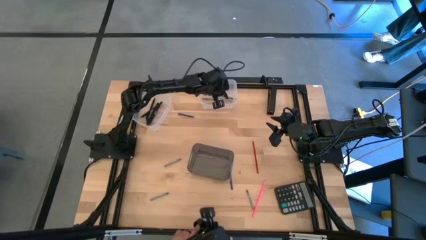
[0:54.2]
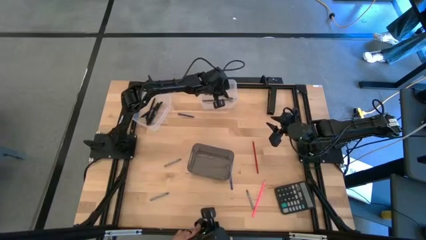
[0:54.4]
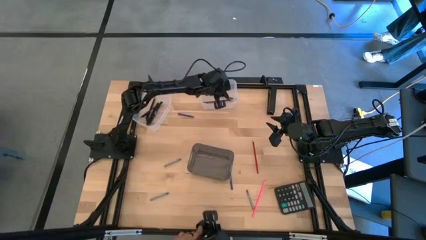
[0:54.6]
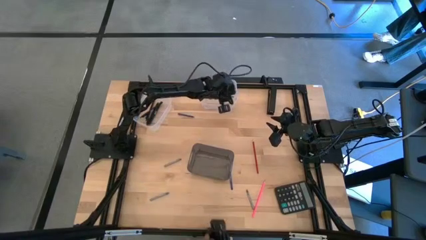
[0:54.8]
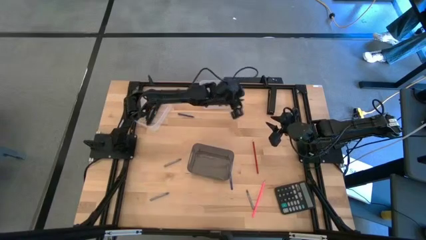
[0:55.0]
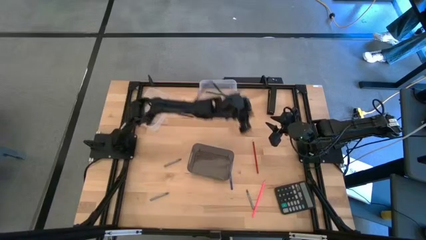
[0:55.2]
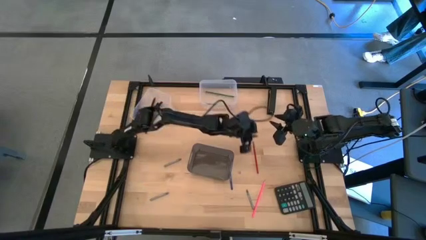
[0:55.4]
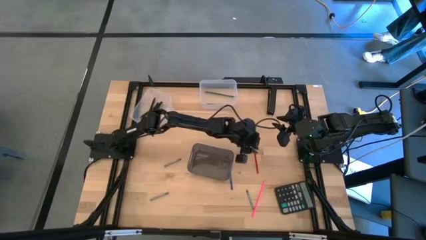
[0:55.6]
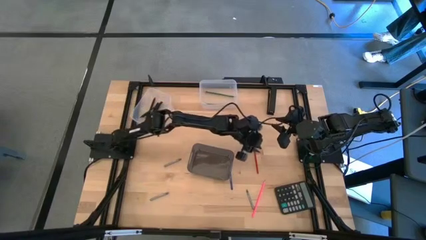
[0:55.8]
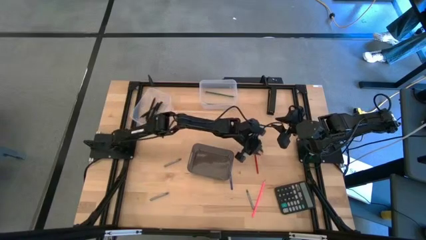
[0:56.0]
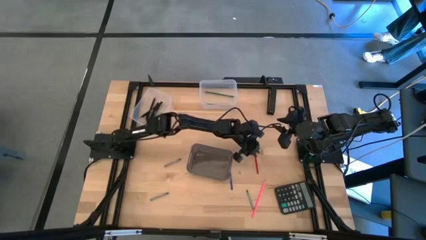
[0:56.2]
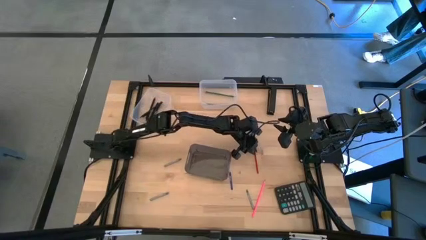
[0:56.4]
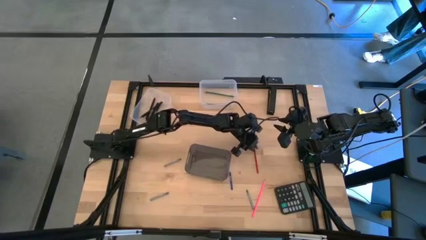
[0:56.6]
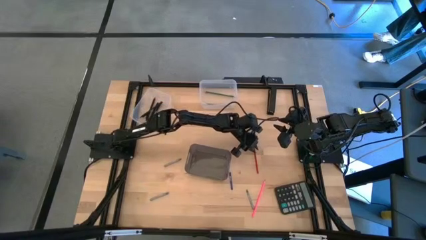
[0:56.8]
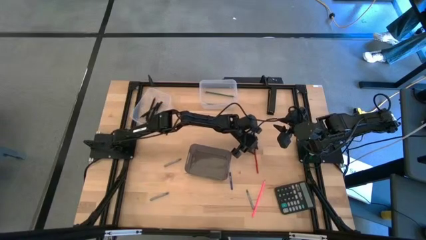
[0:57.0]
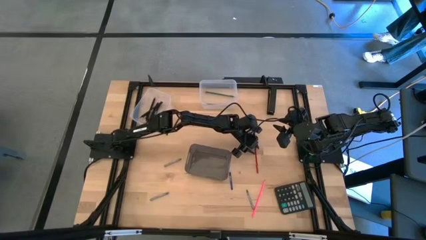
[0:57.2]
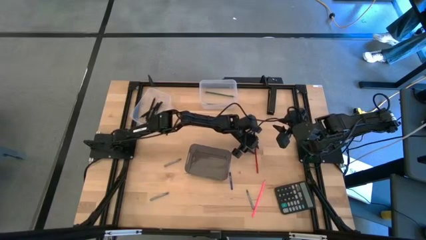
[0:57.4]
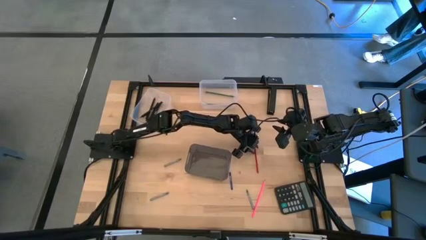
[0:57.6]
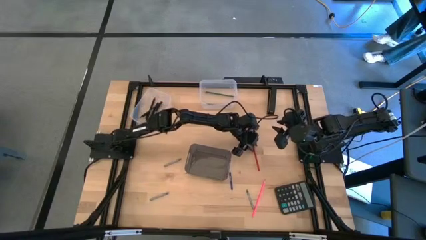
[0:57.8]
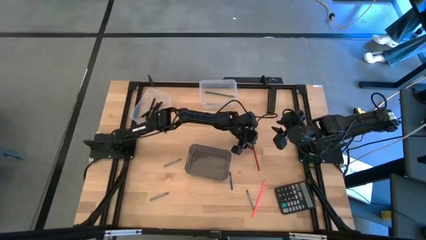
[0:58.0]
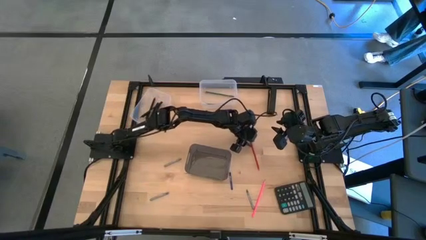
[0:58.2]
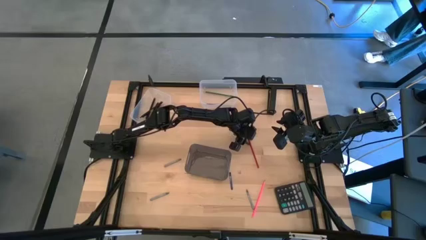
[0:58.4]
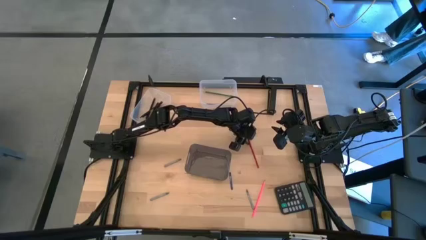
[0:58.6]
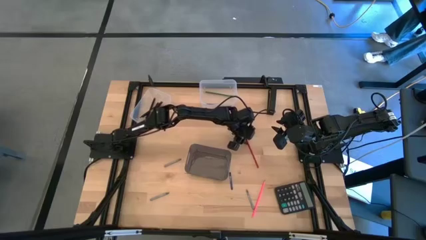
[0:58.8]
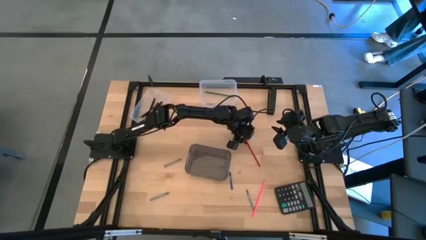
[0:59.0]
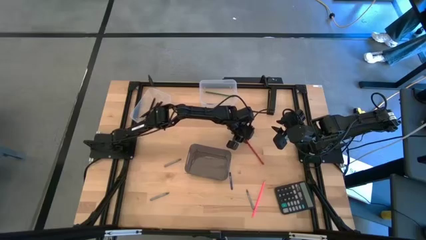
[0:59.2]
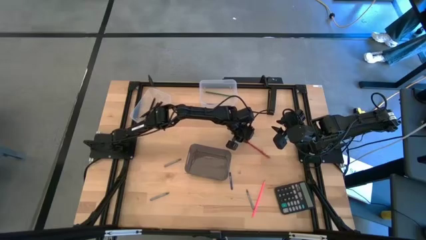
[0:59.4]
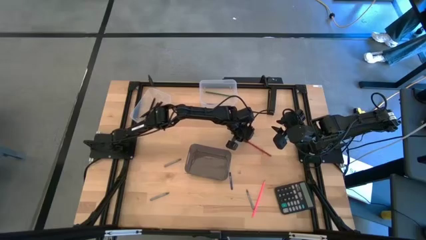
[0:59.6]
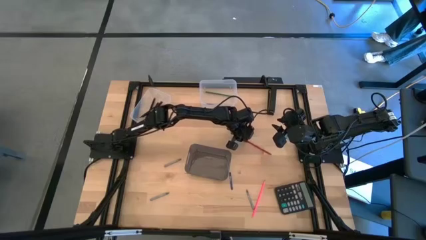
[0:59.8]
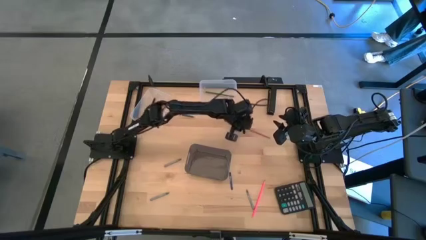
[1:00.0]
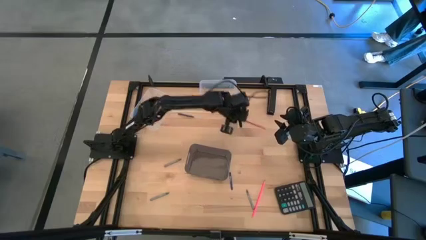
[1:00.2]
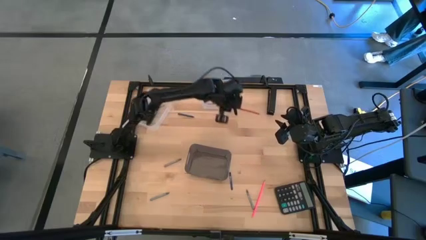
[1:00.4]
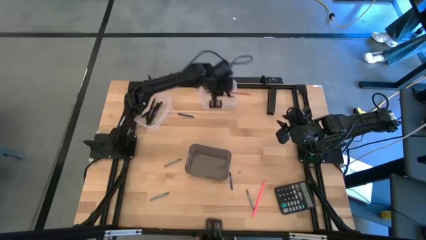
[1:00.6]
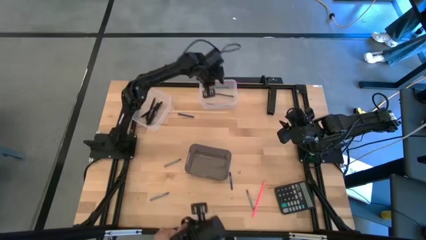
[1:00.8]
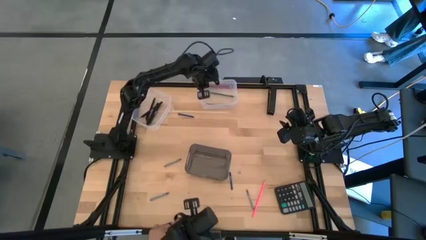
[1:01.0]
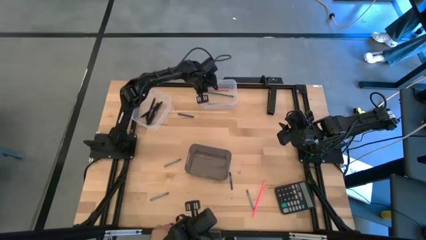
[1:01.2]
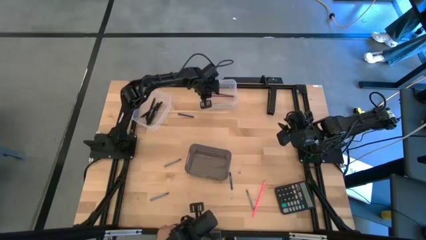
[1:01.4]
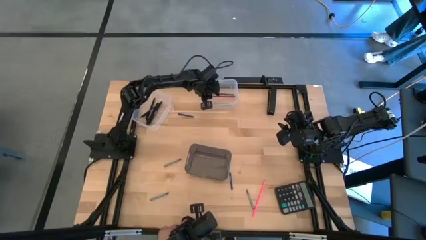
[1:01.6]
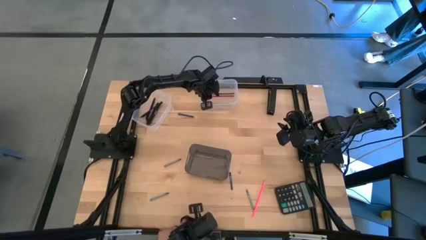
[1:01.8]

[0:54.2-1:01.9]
Task: Sort crayons/erasers/pens/pencils in bins
Put the red pencil into the right transparent bin

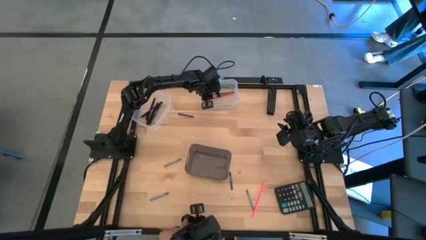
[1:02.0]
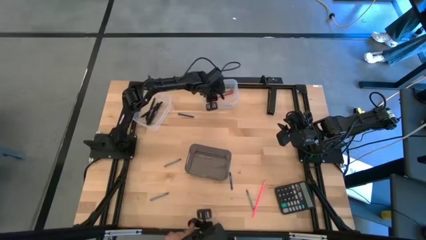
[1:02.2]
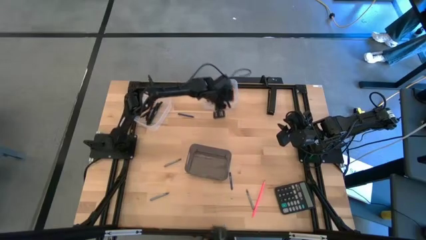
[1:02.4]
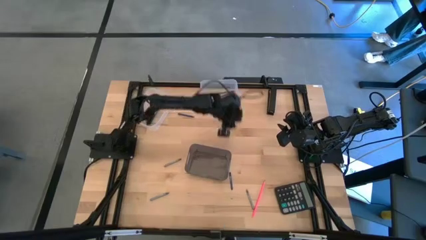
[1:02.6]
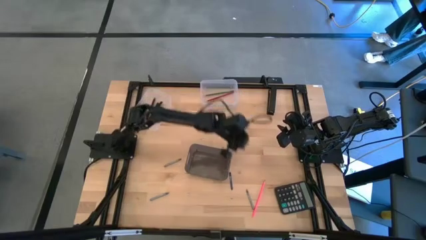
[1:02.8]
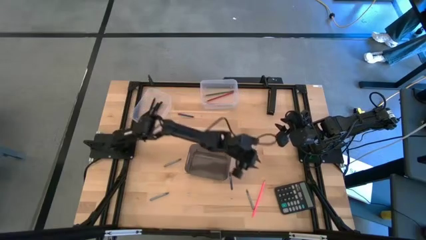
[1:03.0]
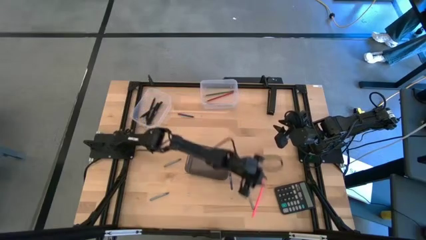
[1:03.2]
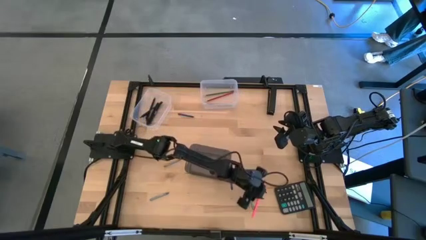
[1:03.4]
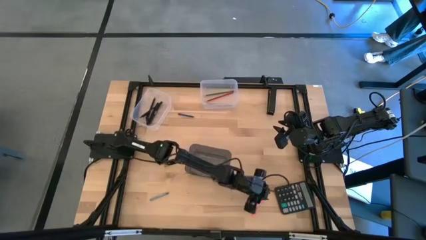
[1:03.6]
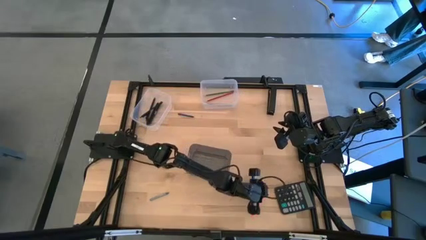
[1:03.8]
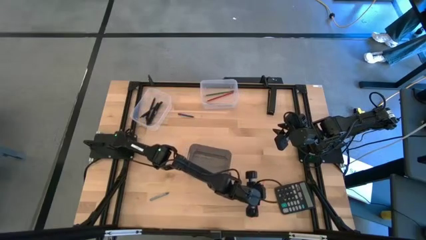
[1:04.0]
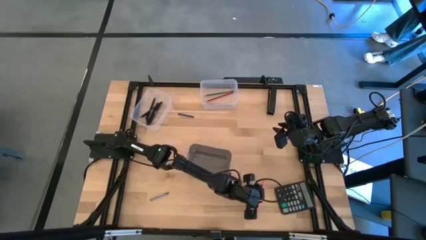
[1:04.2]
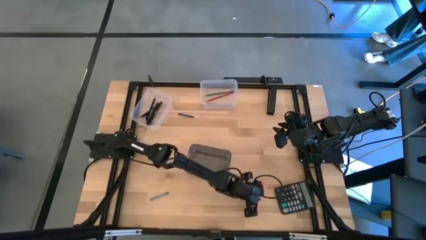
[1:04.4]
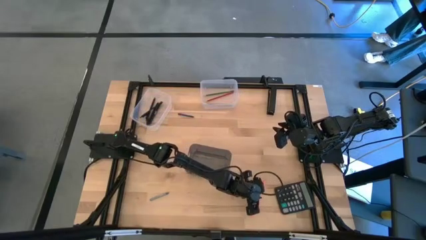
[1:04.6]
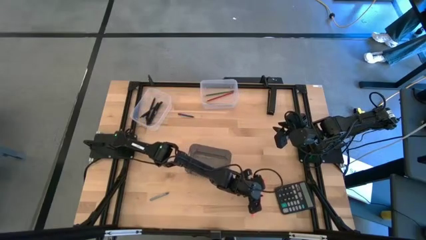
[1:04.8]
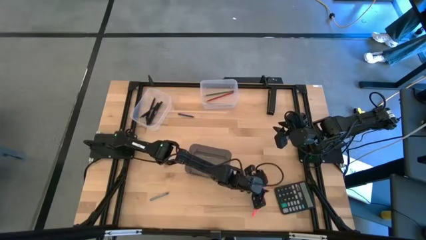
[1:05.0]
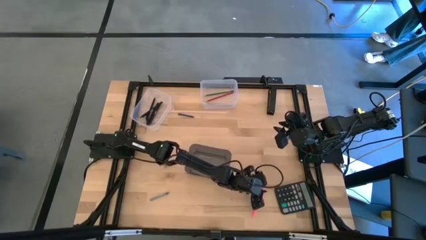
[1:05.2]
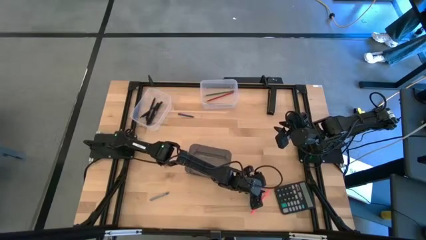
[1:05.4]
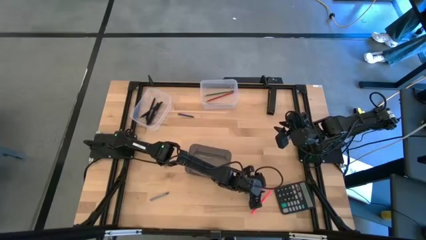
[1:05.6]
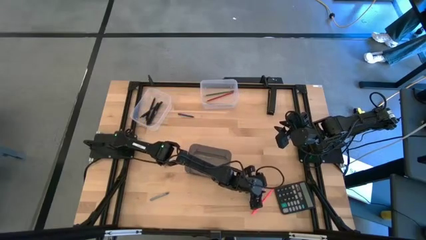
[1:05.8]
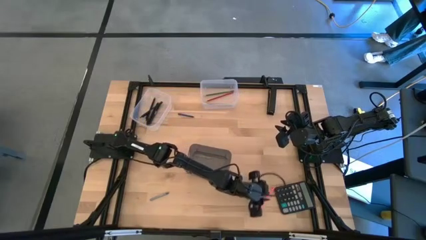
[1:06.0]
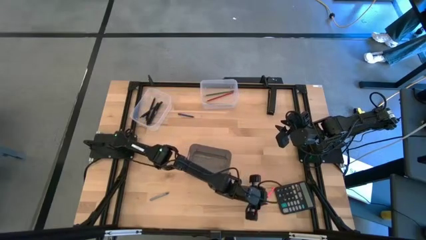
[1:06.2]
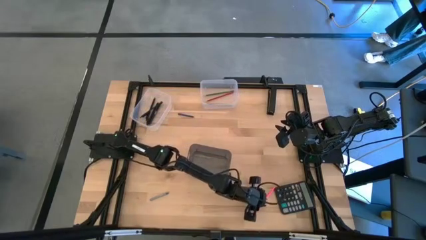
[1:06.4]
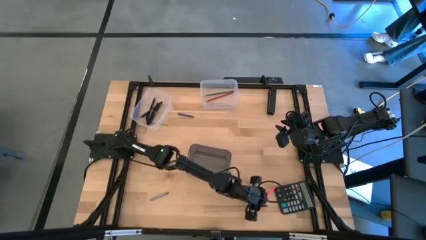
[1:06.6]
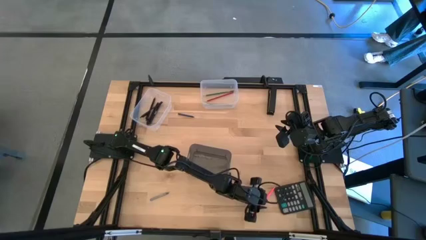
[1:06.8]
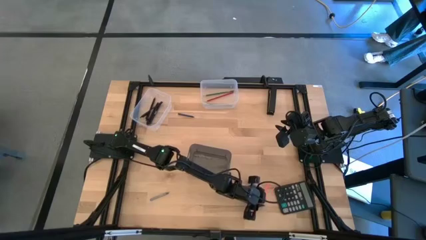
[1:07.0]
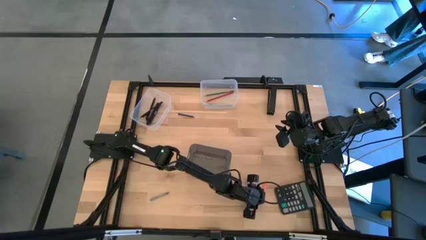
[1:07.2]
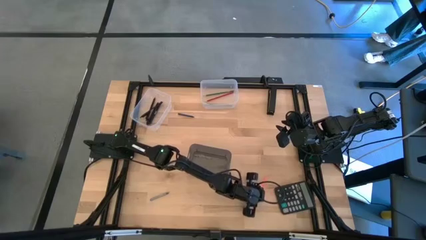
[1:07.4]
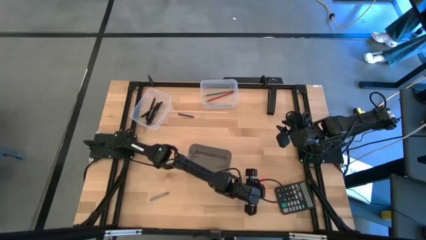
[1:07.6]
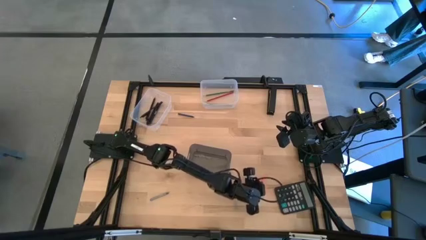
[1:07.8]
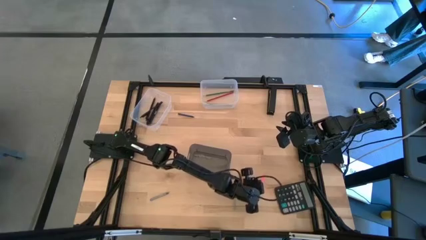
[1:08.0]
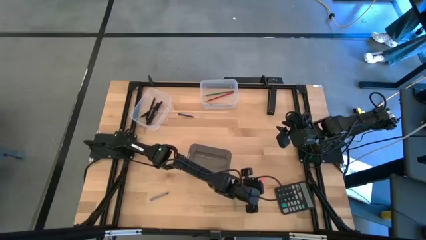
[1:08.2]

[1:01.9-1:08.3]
Put the pink pencil into the right transparent bin

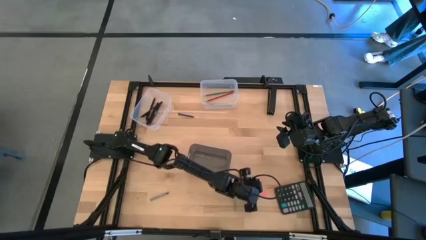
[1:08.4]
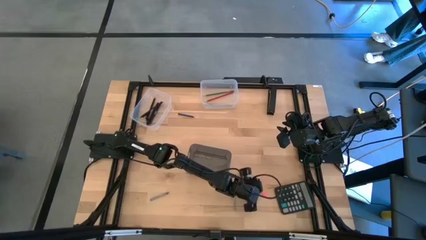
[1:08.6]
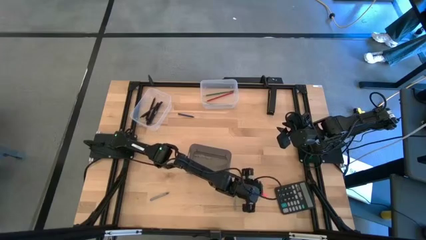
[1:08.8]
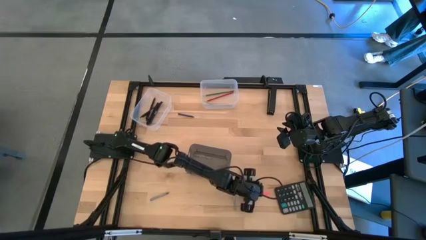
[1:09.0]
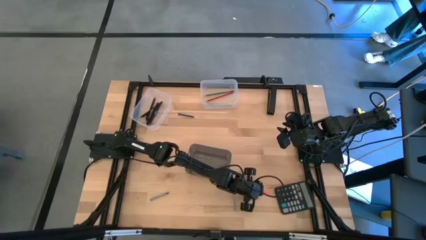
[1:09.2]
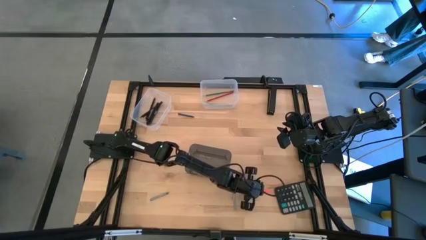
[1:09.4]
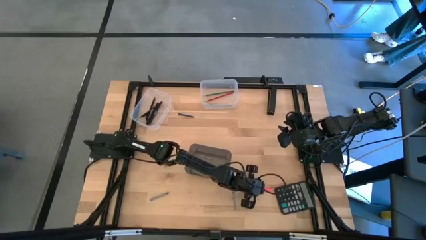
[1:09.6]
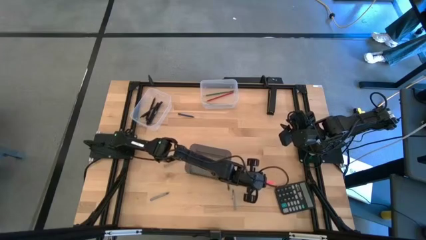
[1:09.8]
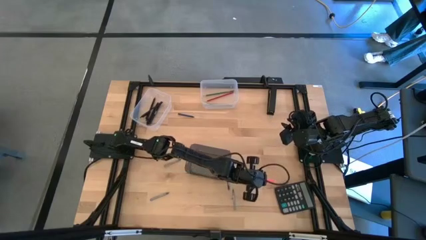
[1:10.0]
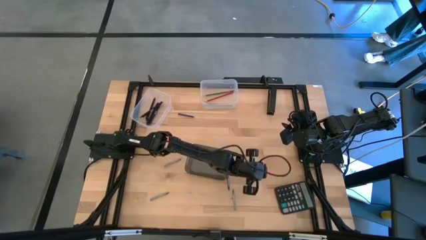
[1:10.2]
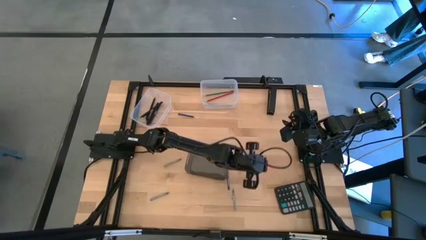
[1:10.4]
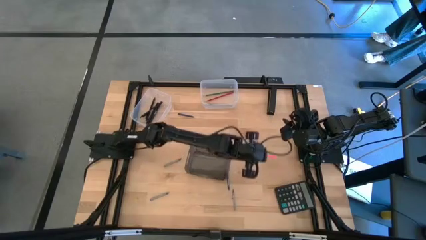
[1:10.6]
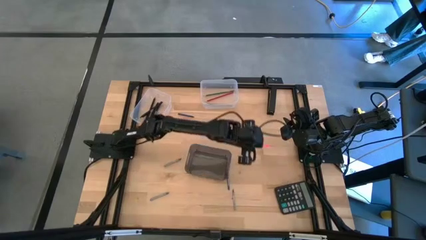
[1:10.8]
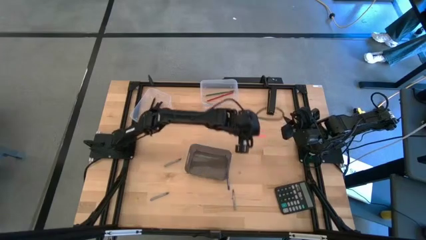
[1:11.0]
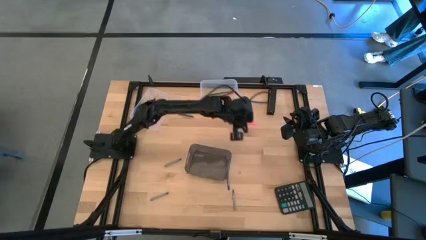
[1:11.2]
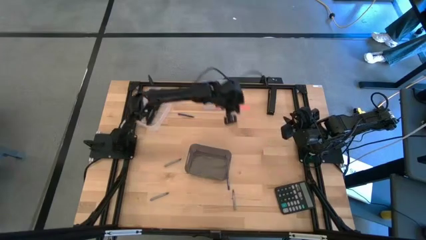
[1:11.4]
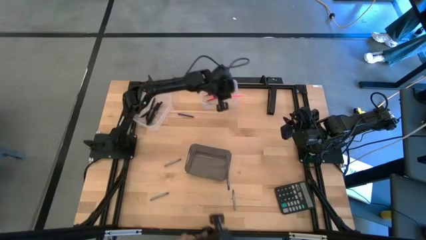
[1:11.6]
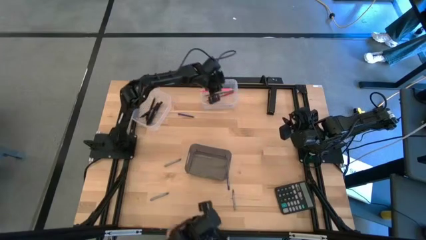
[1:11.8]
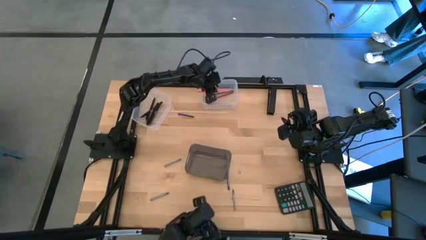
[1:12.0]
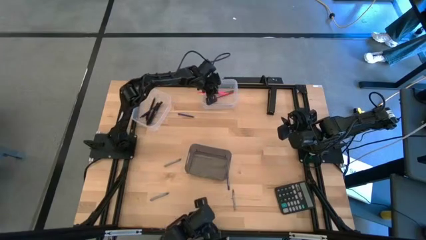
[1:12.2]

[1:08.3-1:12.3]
Put the pink pencil into the right transparent bin
